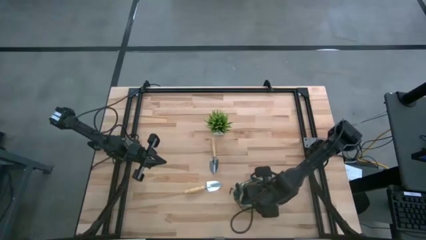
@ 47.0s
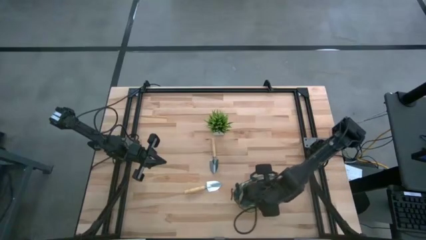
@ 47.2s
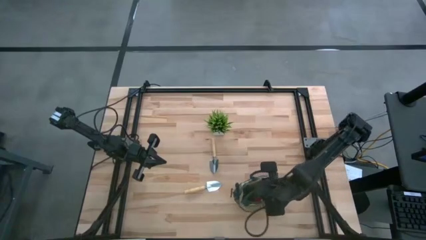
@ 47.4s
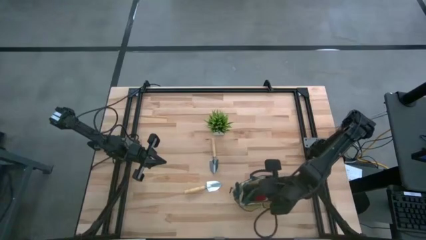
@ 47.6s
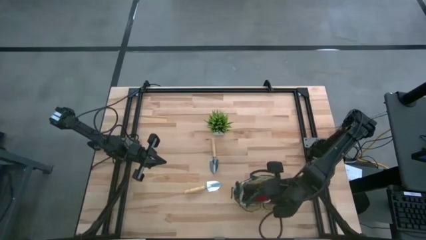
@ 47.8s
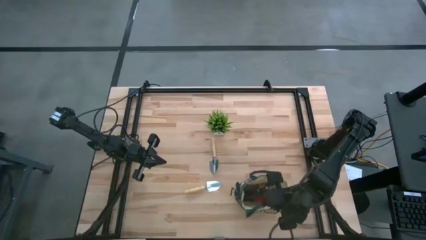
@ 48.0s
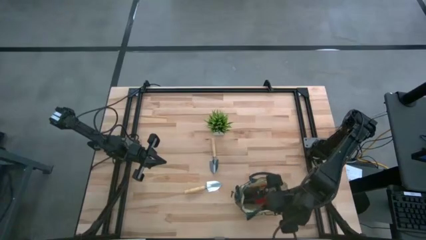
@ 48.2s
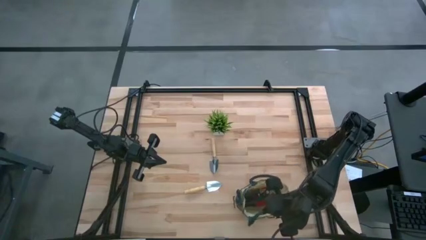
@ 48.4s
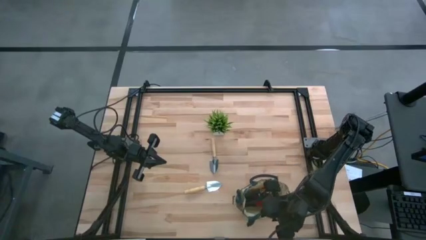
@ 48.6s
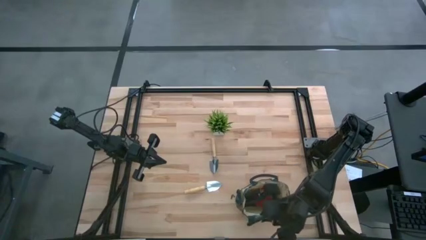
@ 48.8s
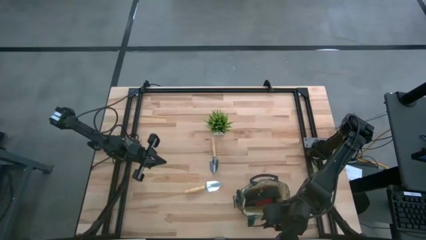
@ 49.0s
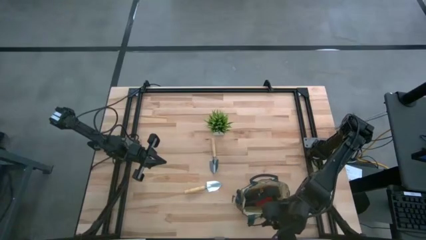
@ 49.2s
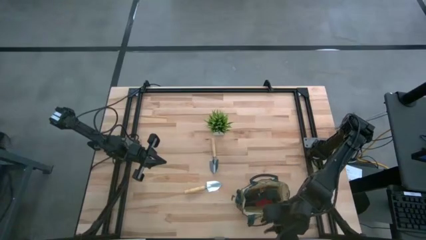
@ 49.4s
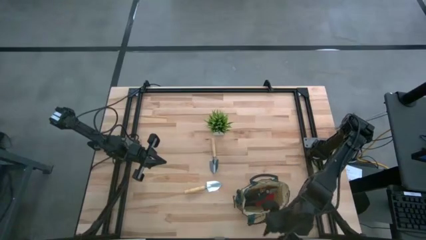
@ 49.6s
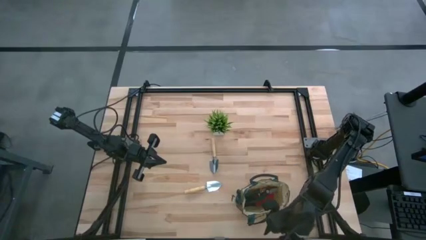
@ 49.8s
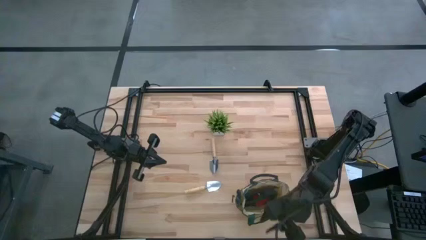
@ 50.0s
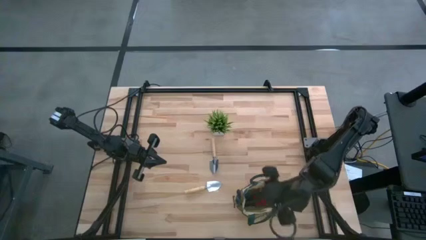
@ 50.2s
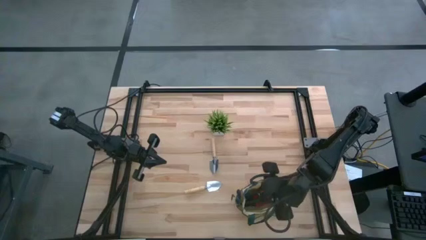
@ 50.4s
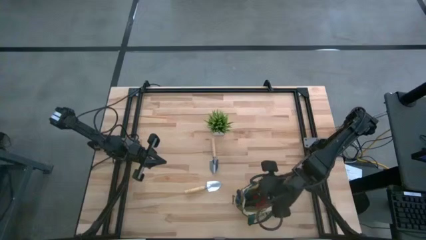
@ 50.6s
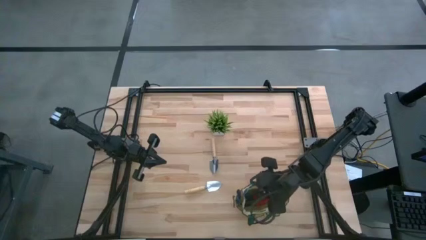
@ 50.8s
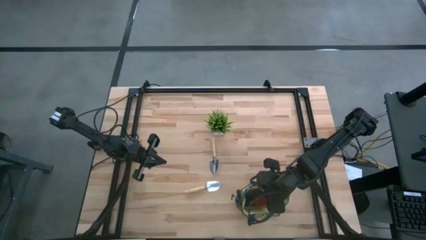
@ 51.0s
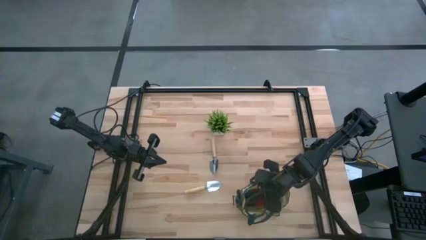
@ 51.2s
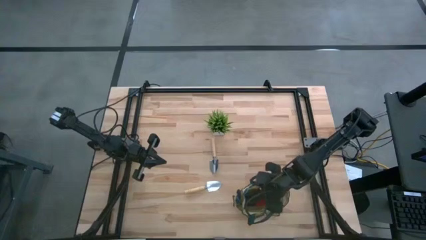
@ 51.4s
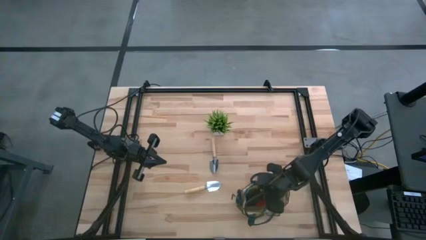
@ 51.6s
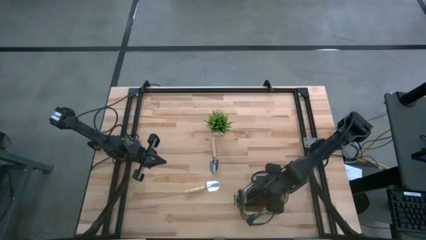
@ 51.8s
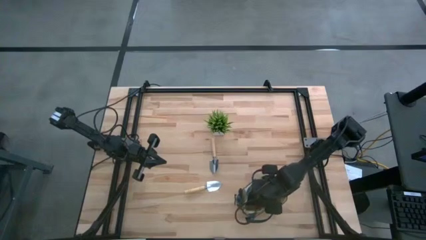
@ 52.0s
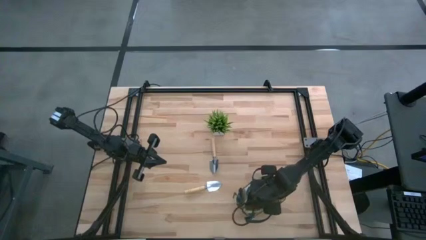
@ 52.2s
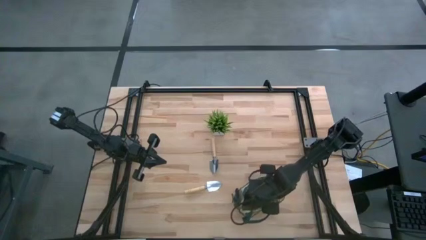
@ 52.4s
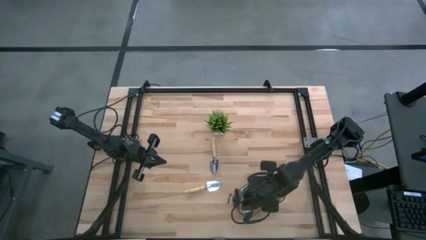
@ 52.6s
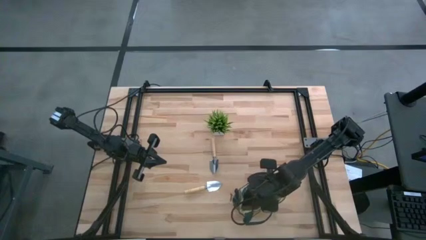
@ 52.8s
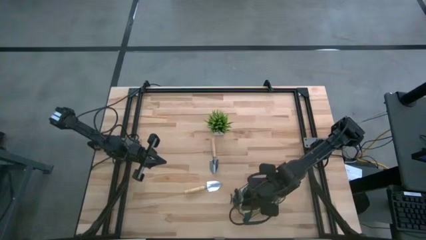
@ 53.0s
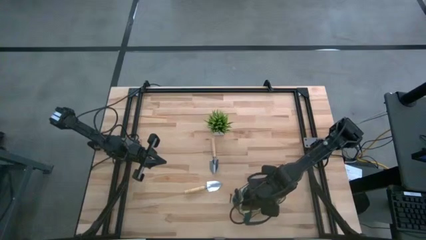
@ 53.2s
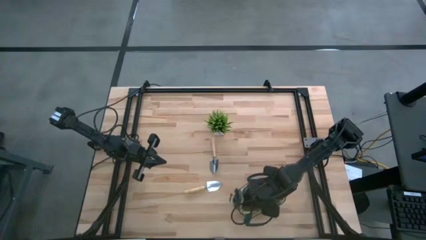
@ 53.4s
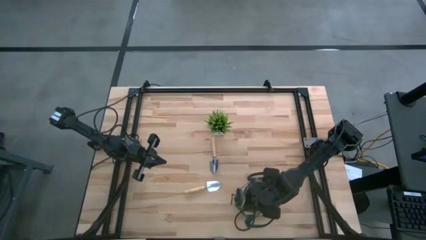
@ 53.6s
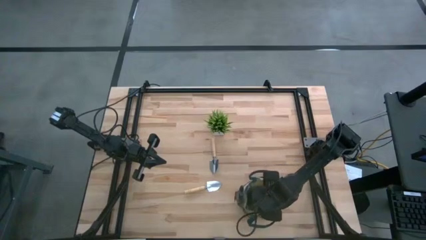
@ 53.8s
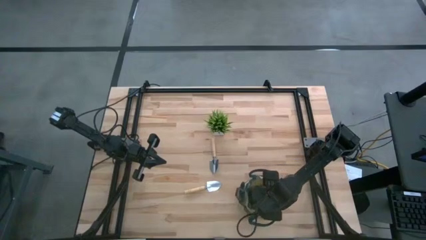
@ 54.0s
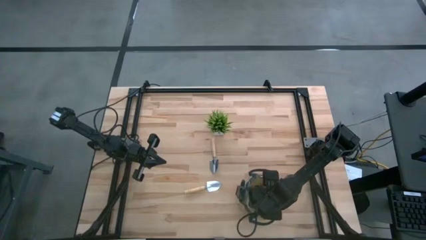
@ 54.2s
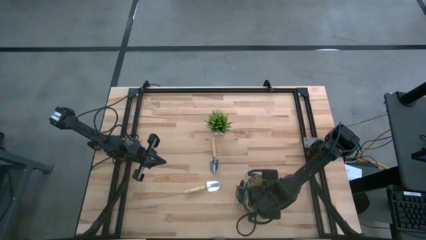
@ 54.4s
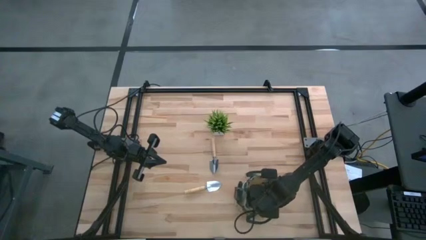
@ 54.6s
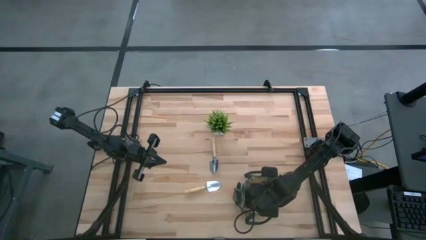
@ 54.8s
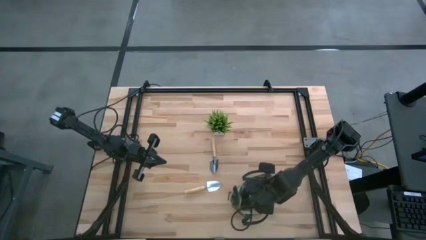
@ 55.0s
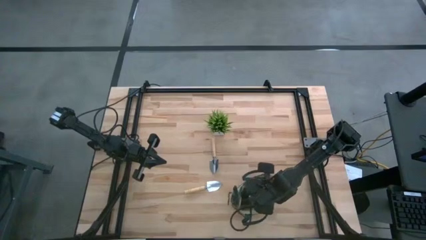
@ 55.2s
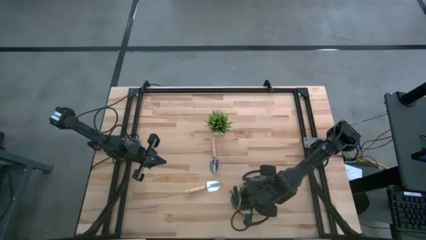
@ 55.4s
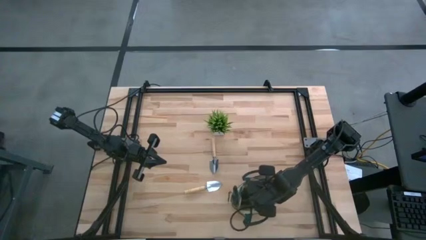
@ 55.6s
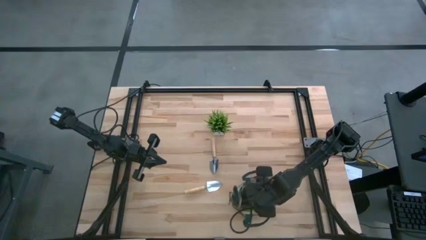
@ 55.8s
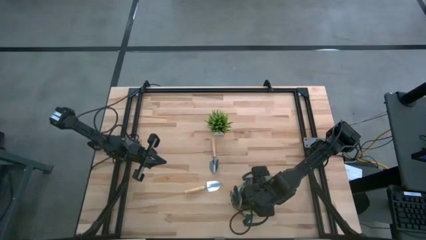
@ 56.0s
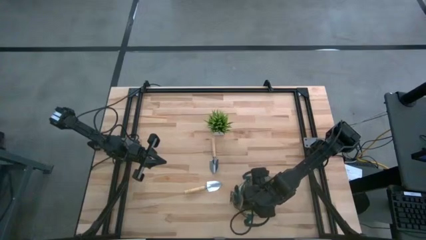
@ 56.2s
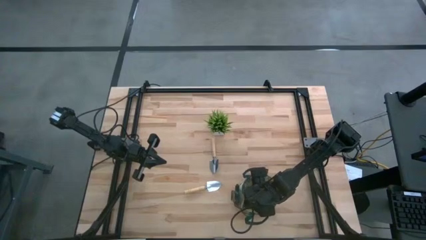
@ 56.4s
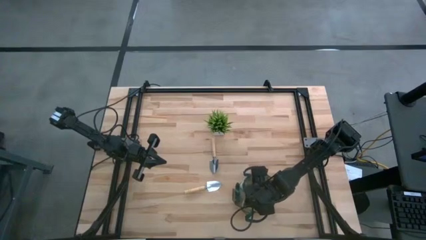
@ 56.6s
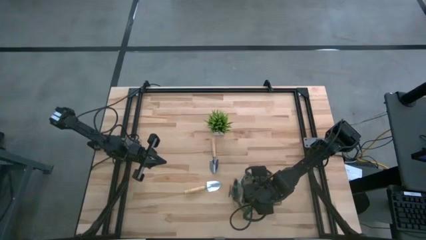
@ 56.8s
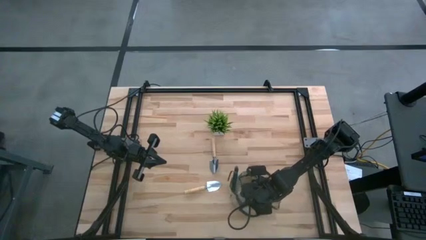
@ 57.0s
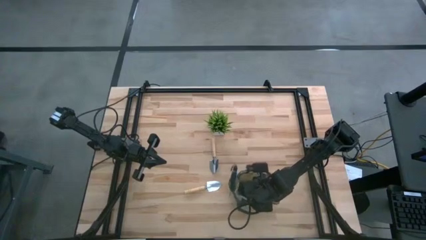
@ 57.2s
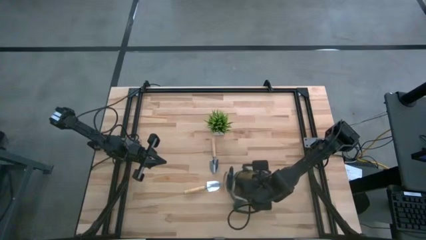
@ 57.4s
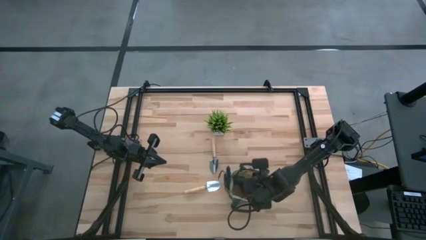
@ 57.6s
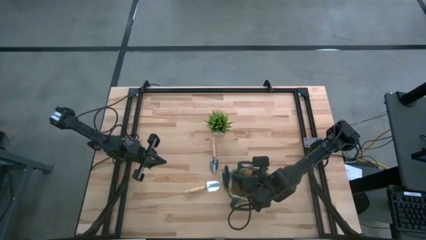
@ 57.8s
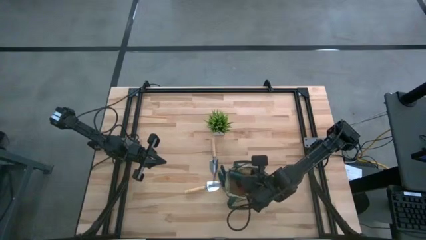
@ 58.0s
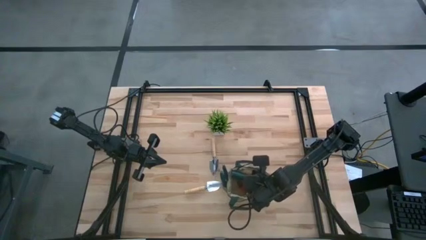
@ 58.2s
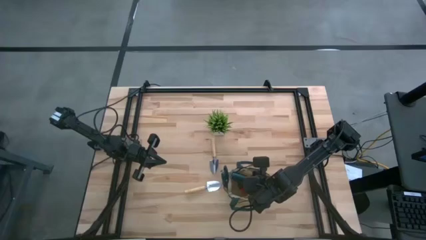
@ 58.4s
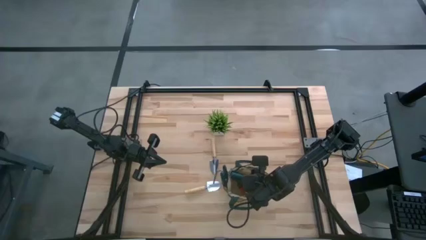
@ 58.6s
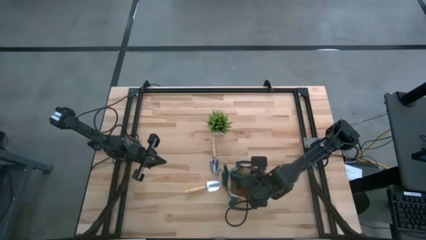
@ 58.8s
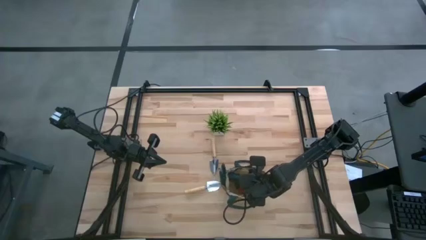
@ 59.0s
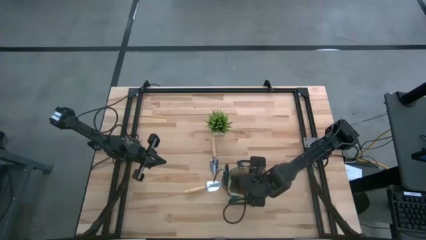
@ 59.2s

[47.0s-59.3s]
Task: Pick & Place Garden tools in Gardening bag
Put the green shear scissors into the green gardening bag

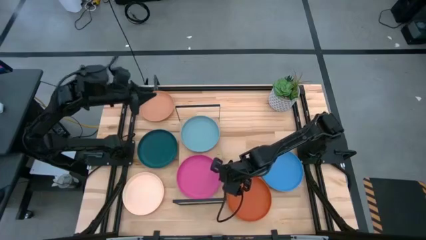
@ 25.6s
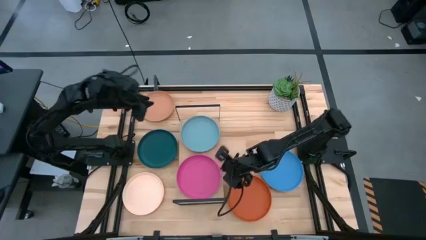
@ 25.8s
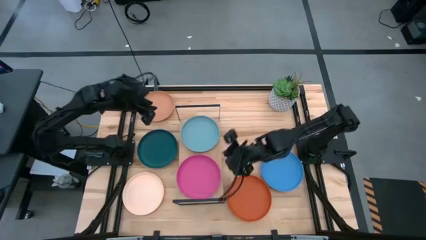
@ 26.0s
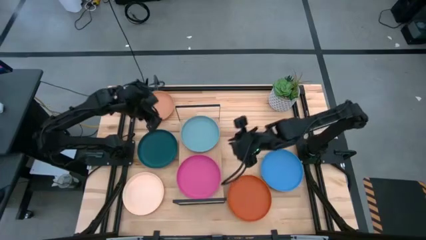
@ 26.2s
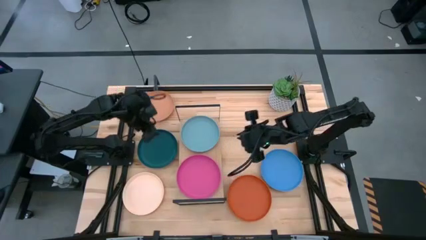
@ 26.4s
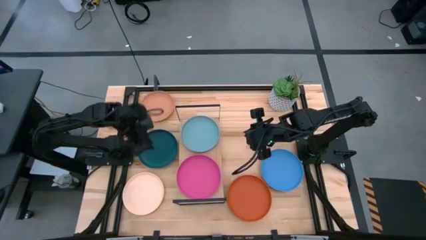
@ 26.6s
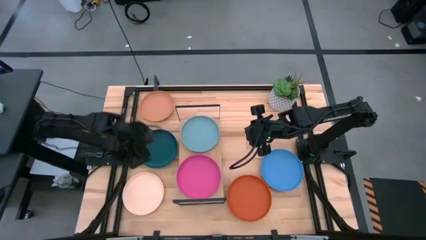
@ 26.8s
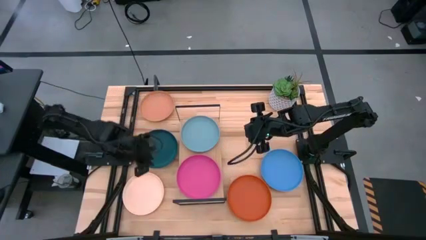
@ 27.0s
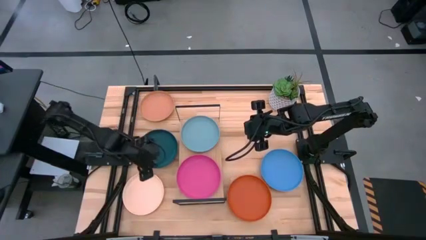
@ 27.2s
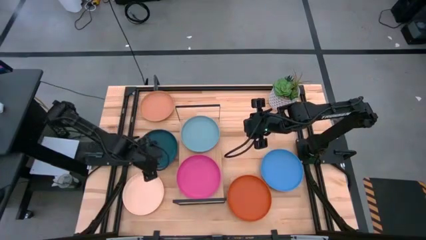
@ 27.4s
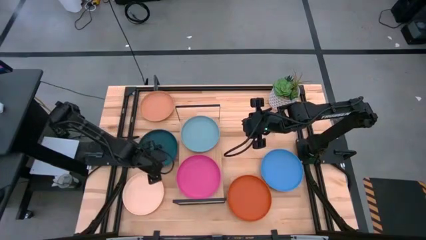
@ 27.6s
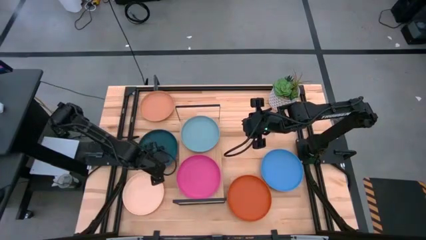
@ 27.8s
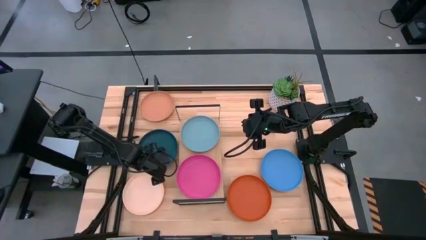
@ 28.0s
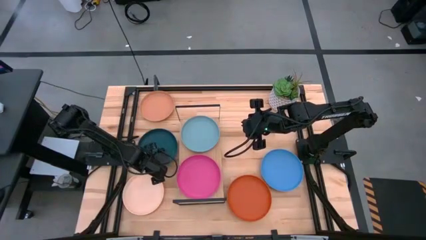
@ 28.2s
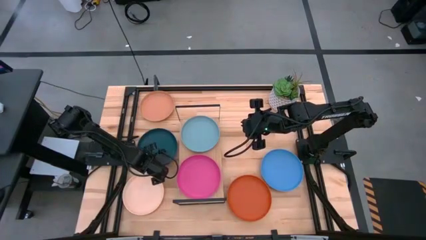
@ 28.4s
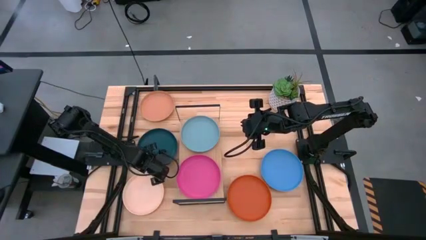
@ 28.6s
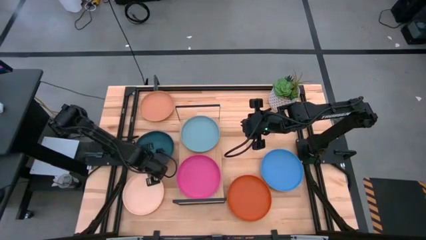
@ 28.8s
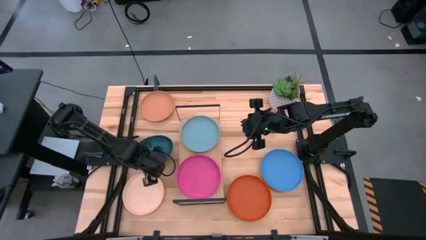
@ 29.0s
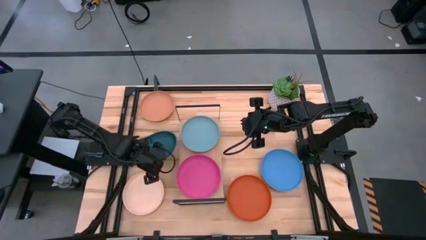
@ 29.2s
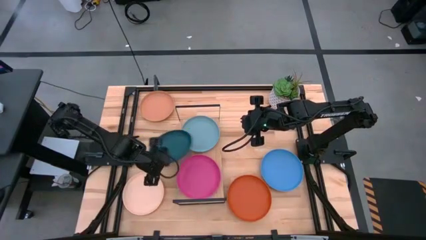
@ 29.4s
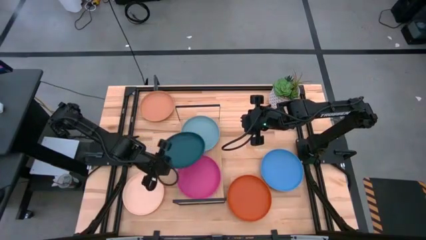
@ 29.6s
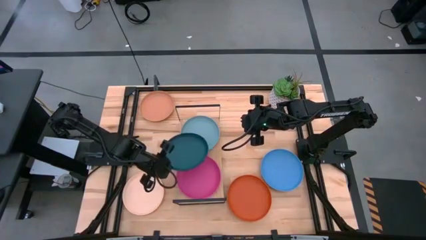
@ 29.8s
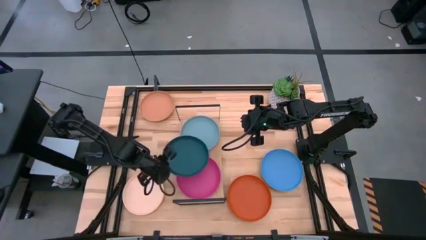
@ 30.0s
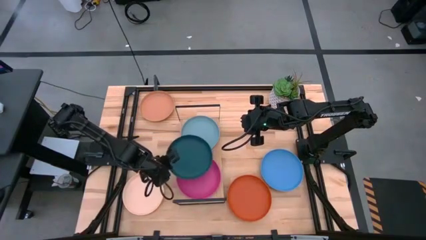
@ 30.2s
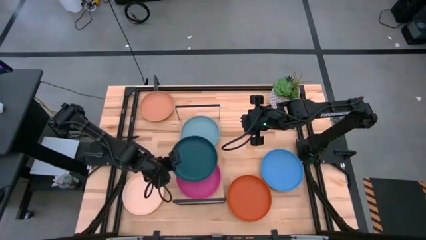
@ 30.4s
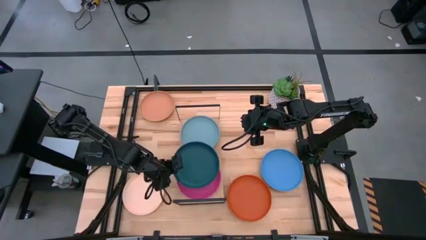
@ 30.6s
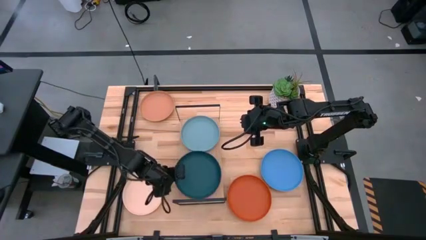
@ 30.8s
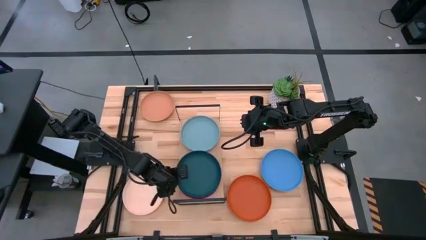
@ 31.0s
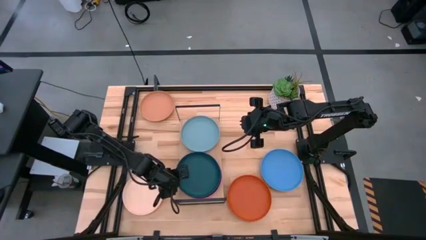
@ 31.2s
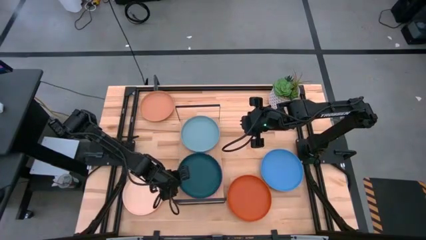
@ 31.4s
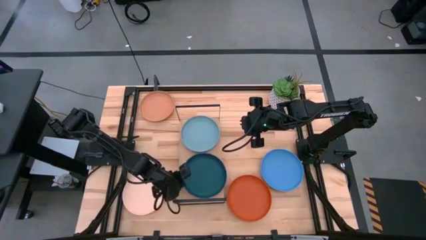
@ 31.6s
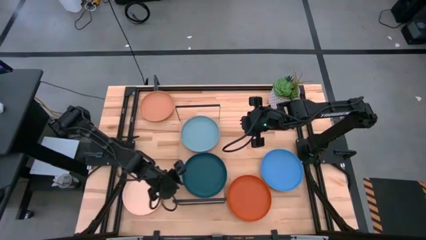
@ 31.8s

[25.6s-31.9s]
Task: Place and stack plates onto a shelf
Stack the dark green plate on top of the pink plate on the shelf
